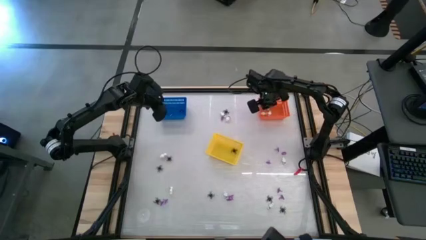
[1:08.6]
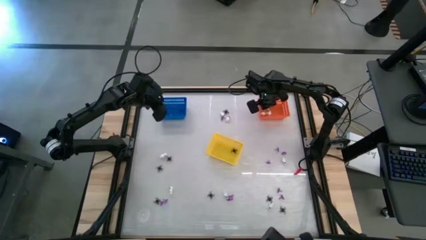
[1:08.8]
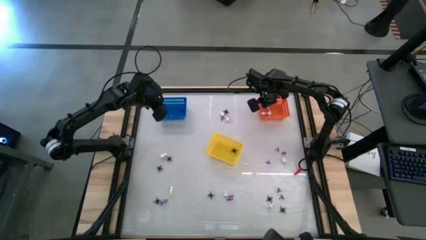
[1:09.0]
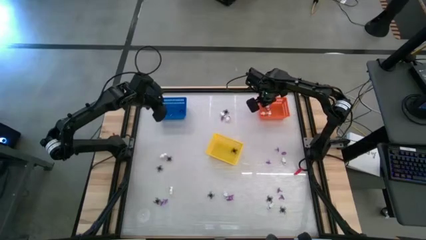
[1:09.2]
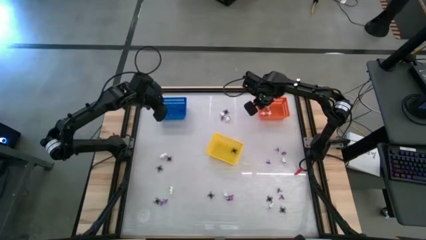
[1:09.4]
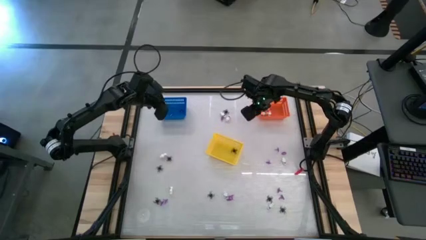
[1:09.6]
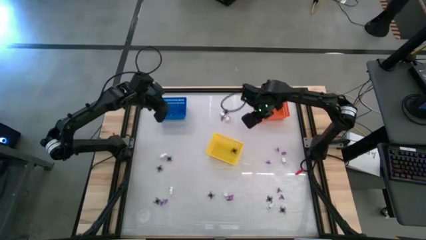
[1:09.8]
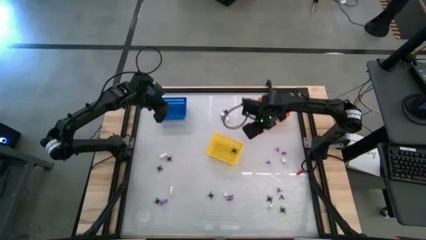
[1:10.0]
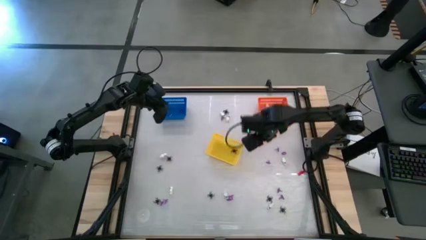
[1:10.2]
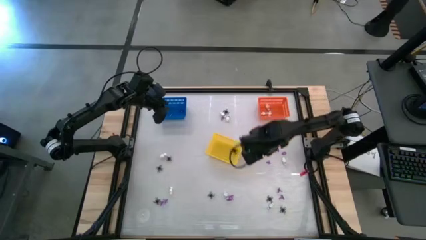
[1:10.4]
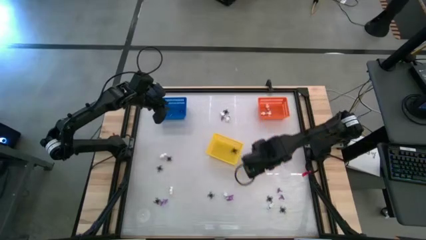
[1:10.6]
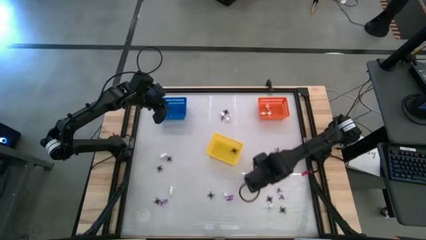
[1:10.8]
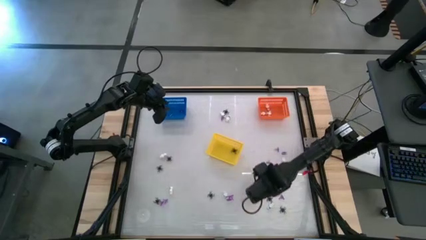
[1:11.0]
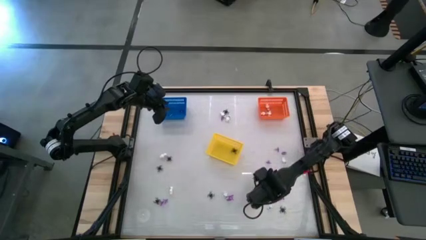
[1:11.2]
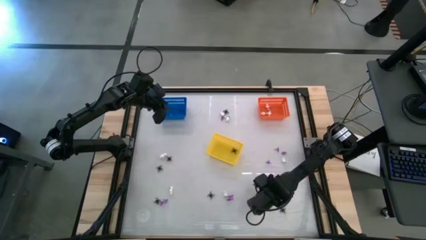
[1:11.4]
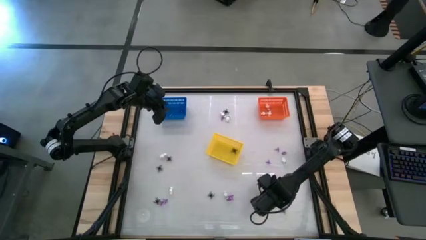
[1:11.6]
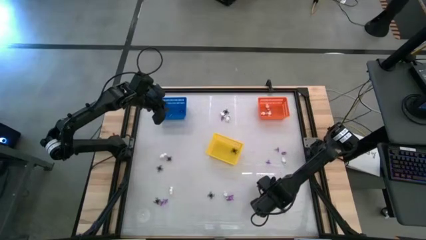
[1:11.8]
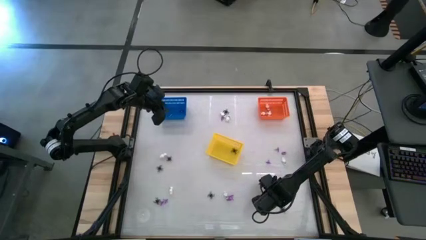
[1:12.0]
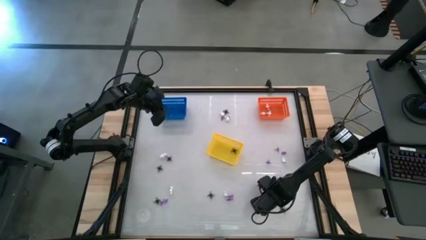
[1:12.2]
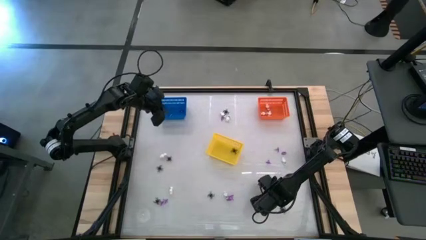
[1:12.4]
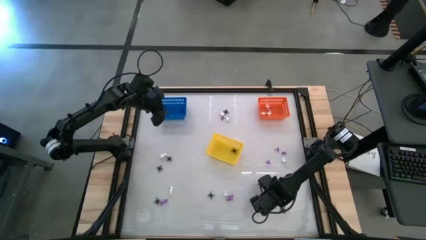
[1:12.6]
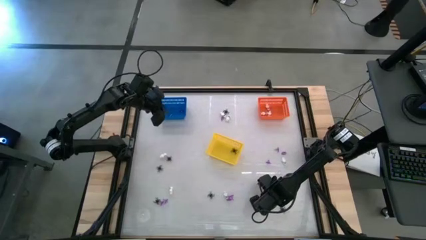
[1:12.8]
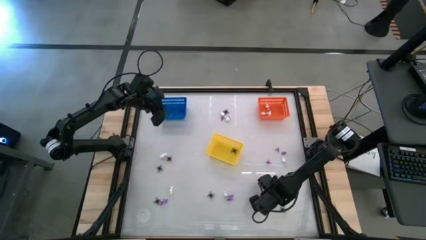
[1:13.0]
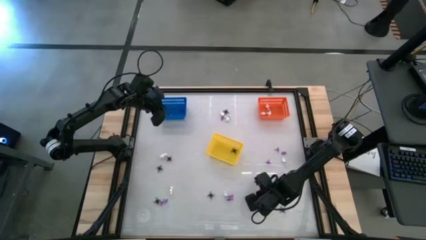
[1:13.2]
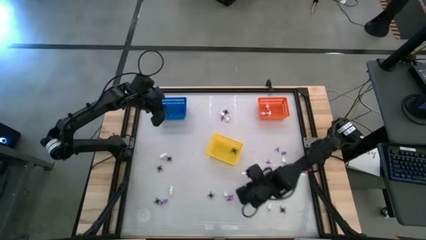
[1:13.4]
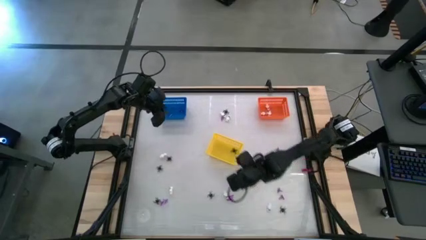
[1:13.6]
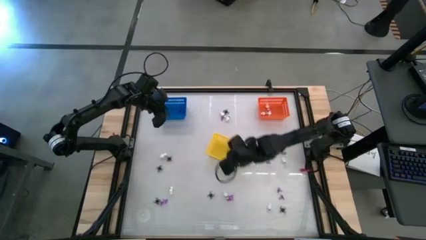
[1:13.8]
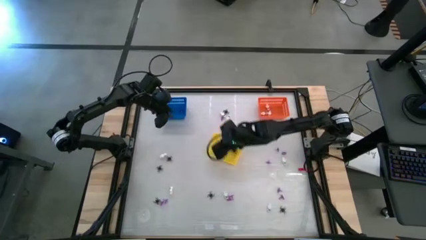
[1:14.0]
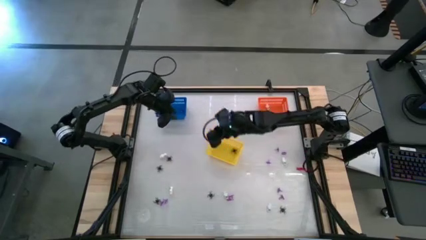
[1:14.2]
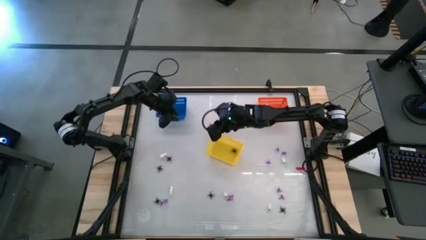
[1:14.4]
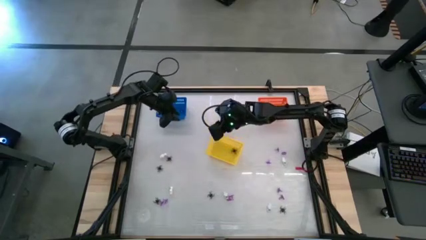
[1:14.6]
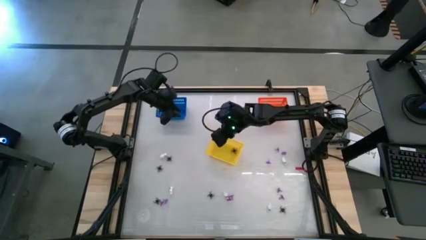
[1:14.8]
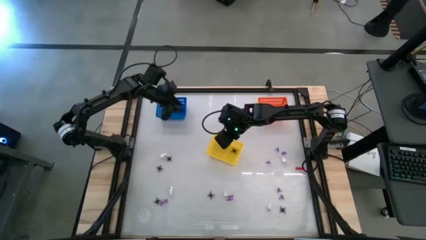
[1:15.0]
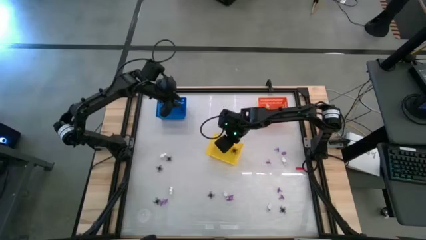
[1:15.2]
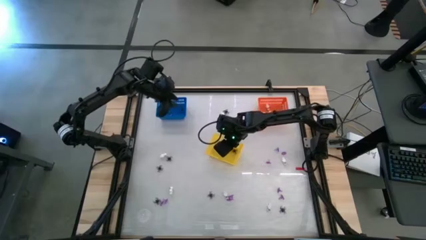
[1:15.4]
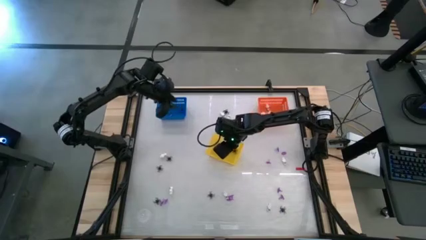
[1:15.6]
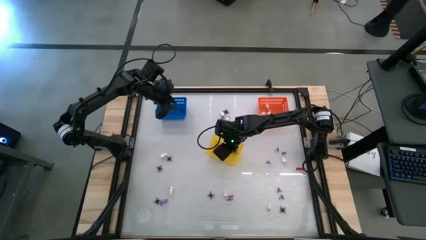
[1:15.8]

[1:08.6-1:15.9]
Task: Sort Halloween decoration
Put the black spider toy into the yellow bin

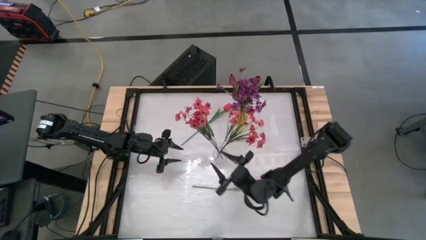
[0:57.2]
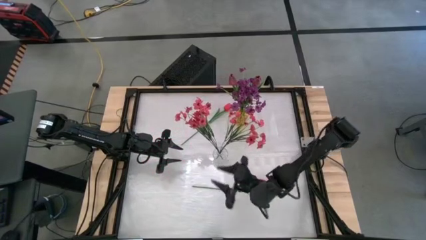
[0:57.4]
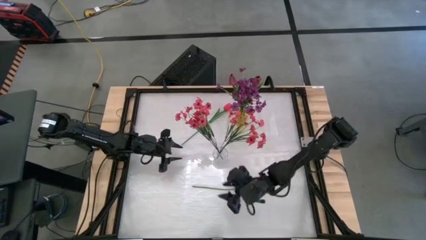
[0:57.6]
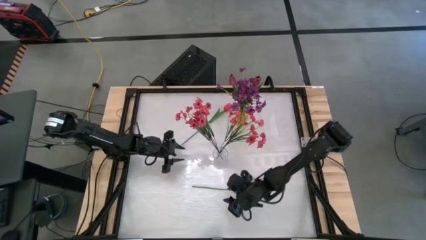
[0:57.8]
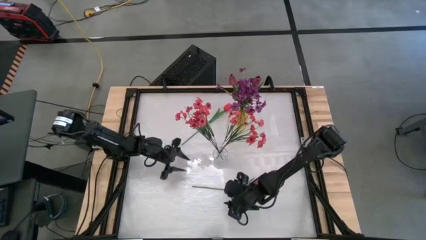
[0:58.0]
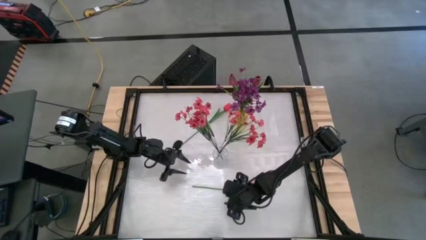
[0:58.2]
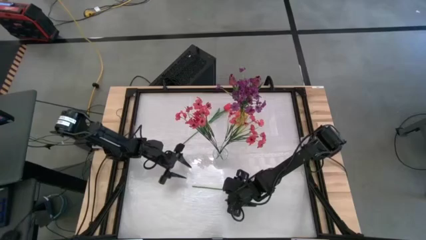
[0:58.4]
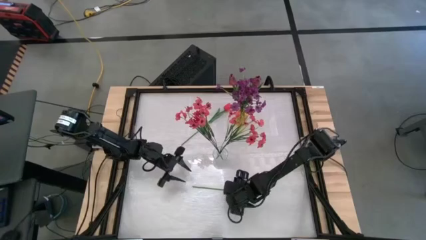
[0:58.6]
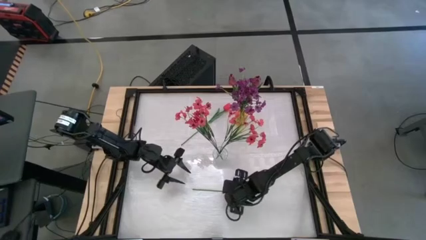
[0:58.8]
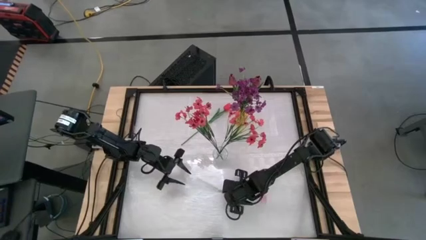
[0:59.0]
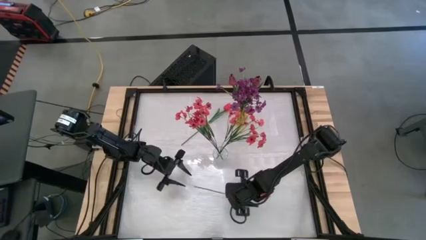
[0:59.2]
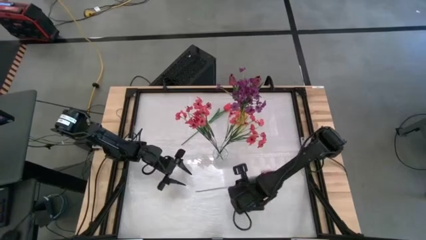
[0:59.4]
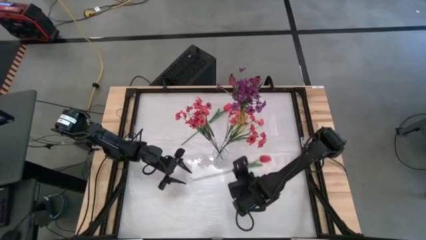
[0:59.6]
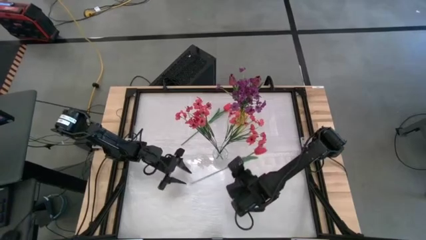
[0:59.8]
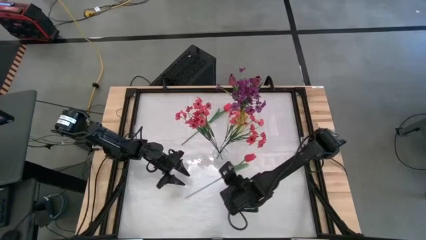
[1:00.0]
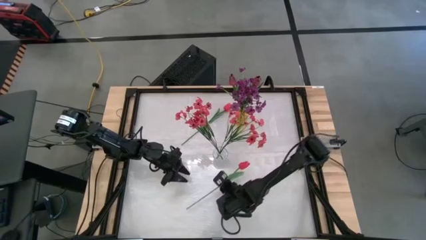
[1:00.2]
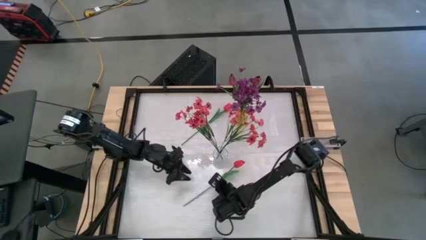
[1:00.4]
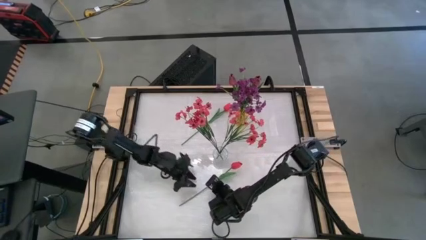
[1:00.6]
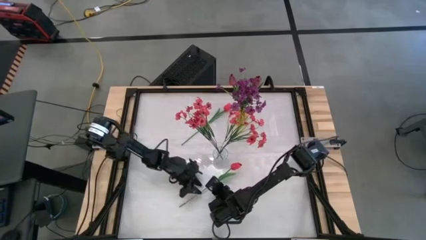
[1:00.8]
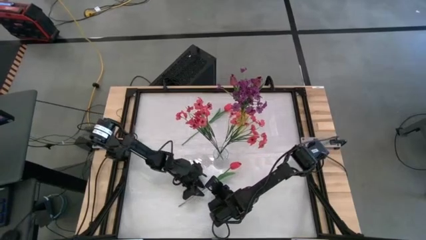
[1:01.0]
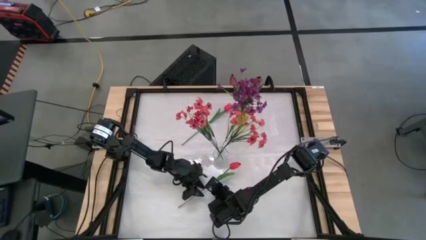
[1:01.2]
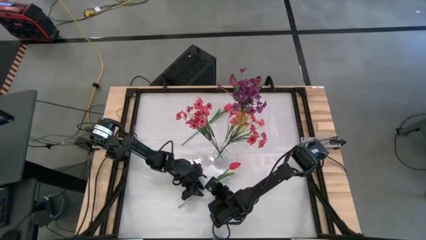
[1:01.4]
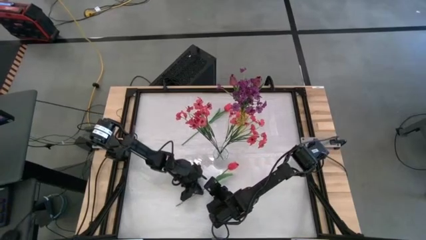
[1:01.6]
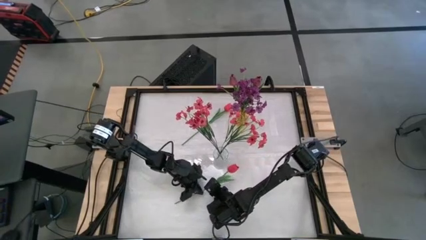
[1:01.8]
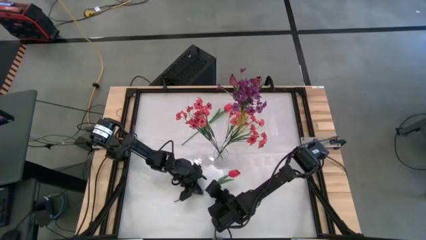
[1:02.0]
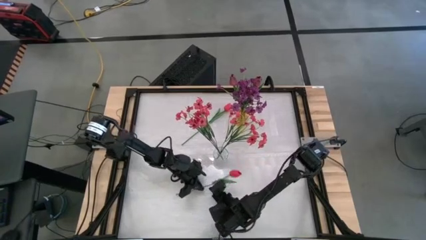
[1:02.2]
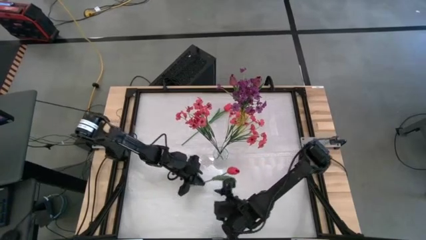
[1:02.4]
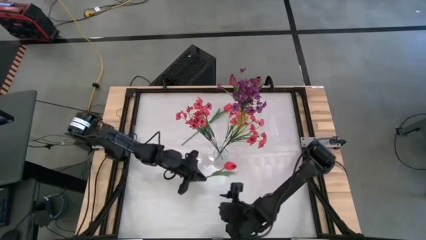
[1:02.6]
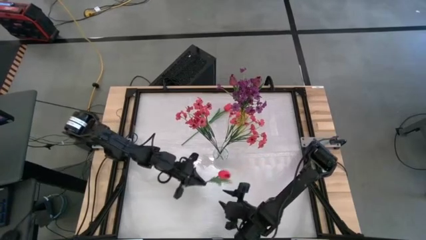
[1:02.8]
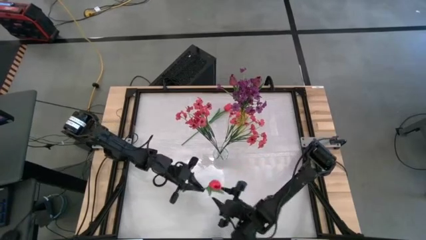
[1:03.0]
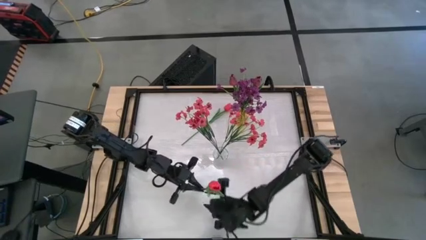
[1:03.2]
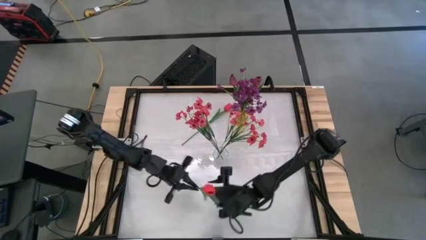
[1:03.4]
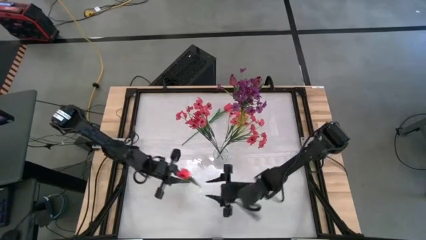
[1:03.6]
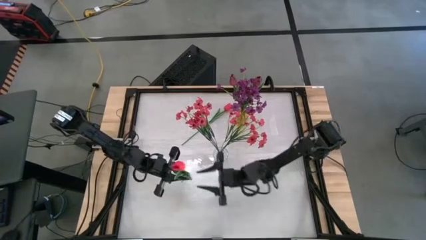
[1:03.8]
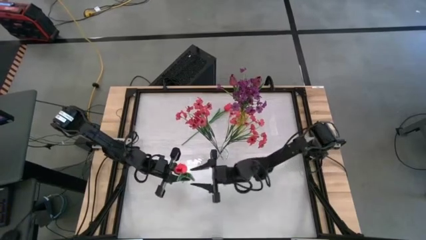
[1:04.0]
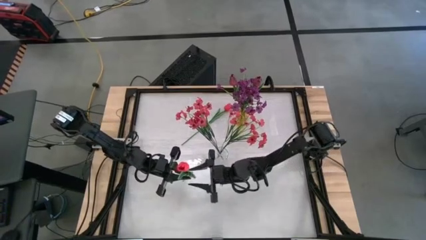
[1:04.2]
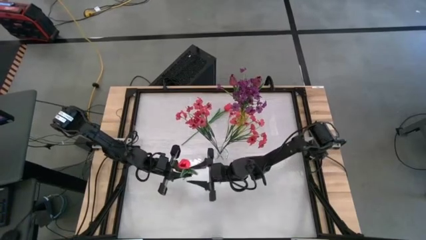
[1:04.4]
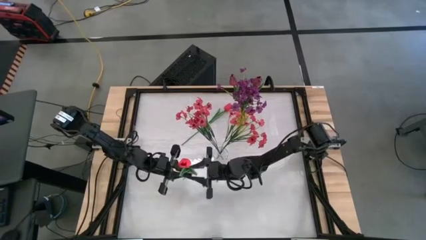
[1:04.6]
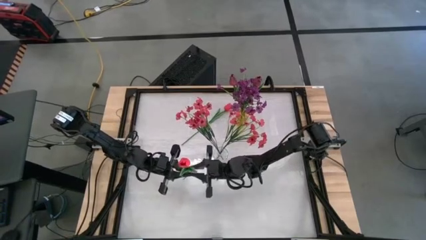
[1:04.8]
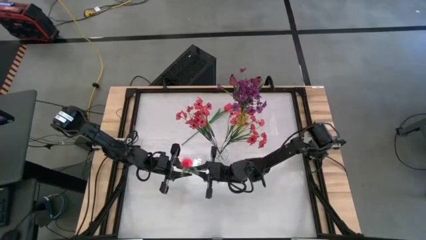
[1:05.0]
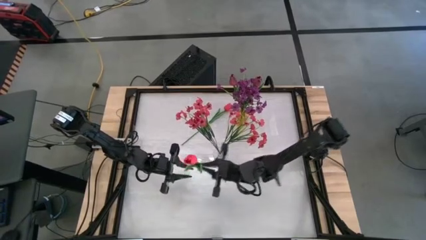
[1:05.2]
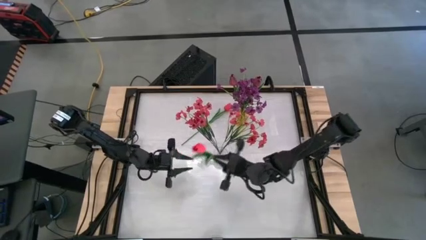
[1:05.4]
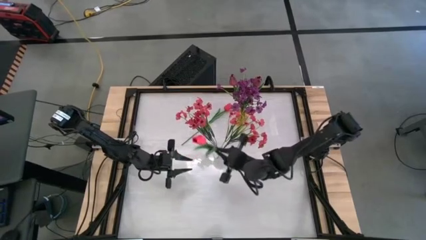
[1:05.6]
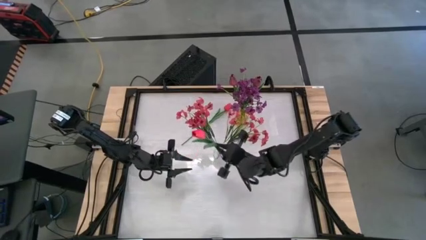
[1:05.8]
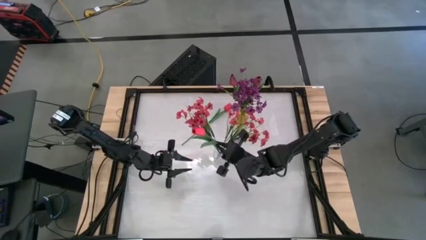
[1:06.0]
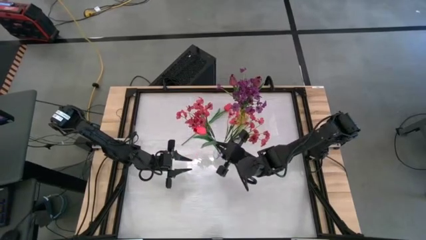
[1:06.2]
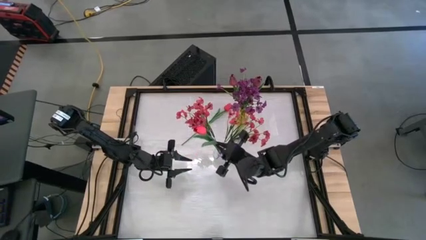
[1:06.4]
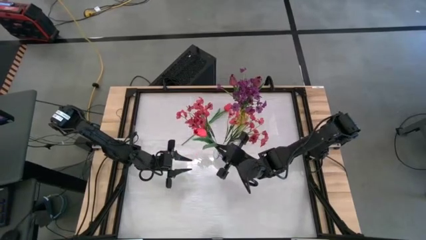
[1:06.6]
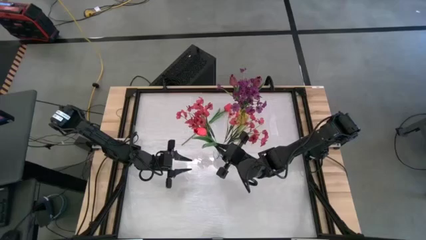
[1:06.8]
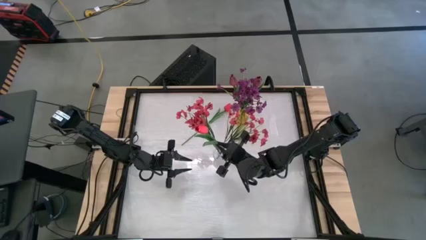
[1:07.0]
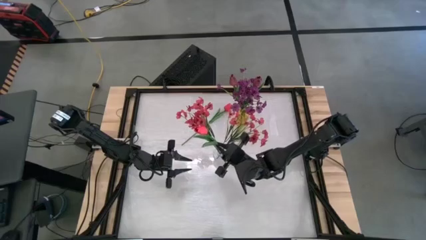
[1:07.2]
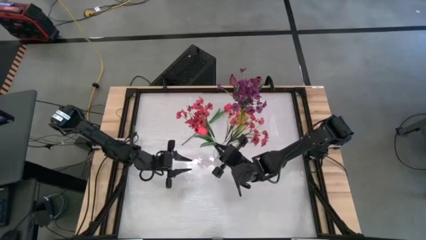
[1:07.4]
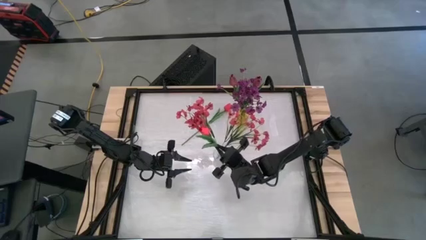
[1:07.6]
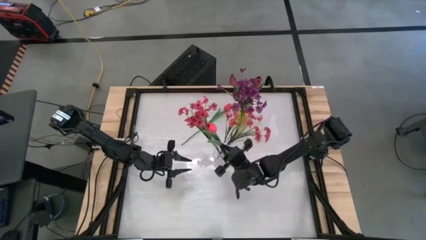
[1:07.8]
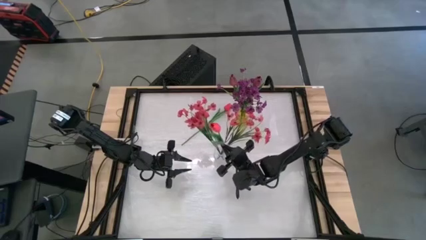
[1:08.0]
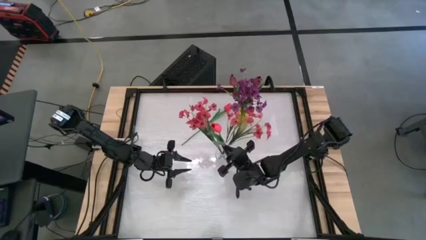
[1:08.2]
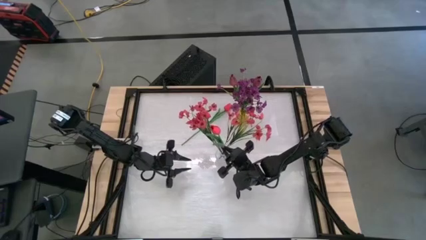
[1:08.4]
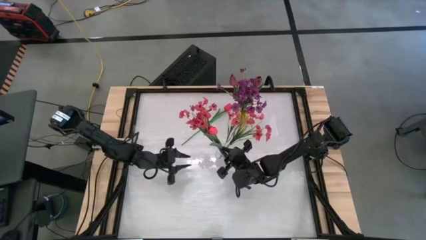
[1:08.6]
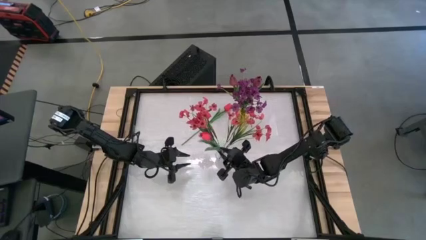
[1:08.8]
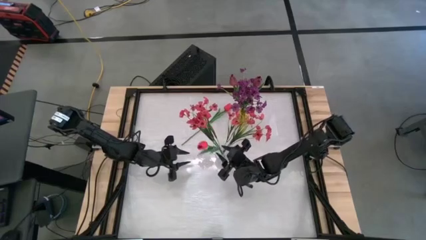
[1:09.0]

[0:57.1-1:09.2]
Task: Sort flowers into vase by color
Put the bottom pink flower into the transparent vase
